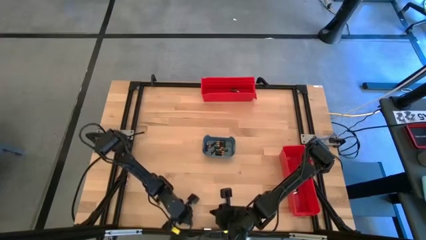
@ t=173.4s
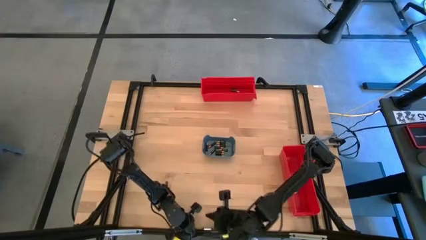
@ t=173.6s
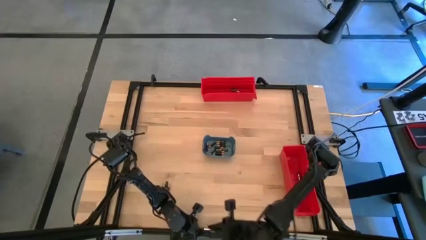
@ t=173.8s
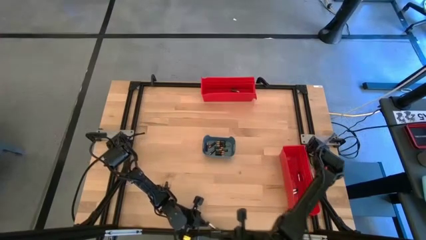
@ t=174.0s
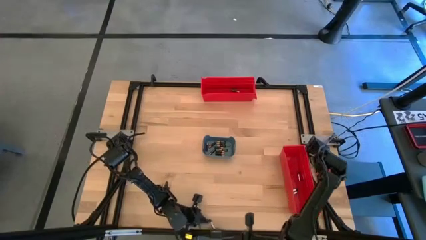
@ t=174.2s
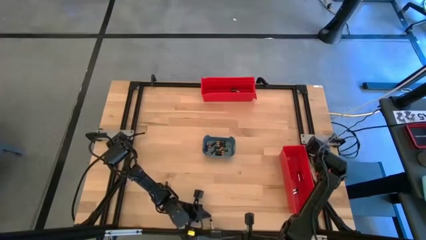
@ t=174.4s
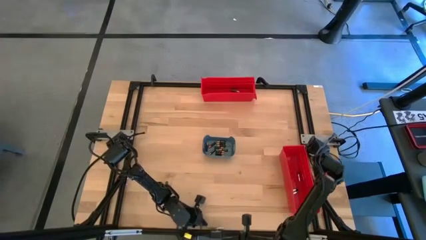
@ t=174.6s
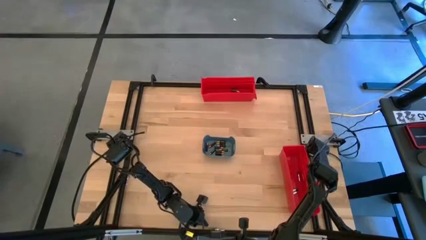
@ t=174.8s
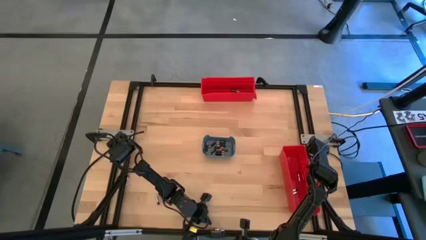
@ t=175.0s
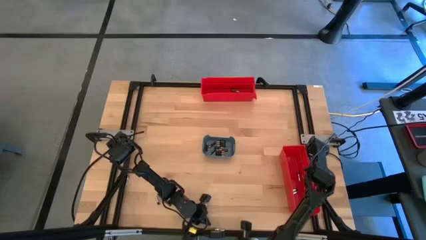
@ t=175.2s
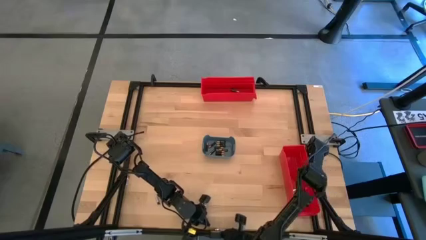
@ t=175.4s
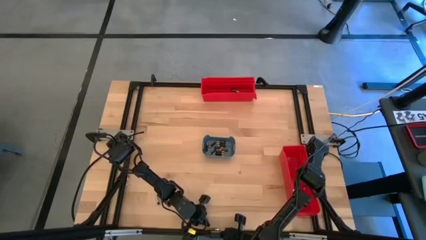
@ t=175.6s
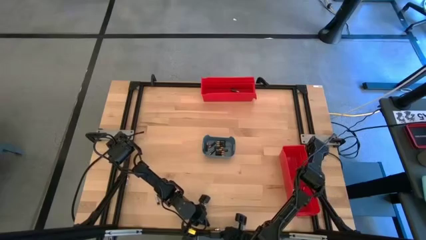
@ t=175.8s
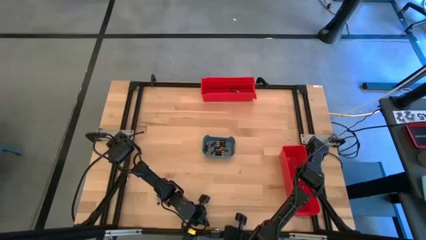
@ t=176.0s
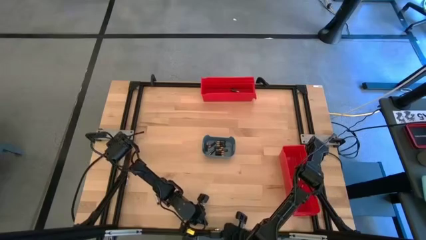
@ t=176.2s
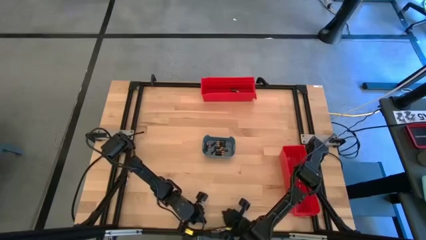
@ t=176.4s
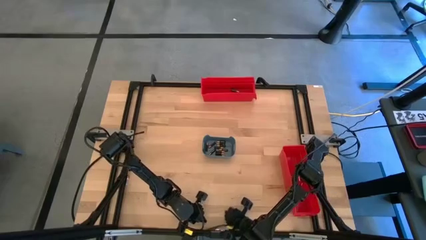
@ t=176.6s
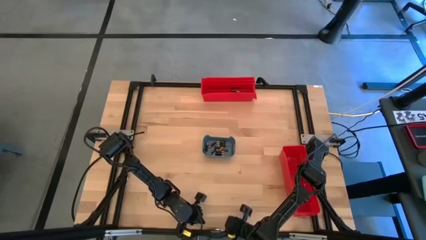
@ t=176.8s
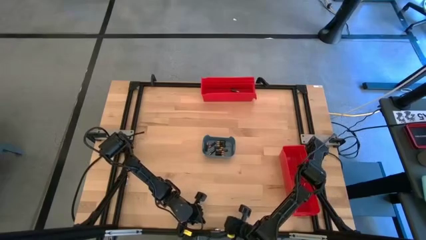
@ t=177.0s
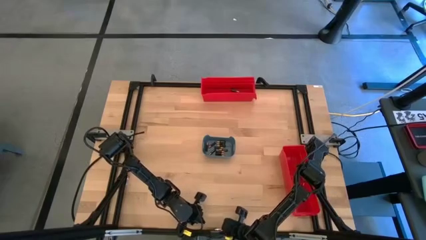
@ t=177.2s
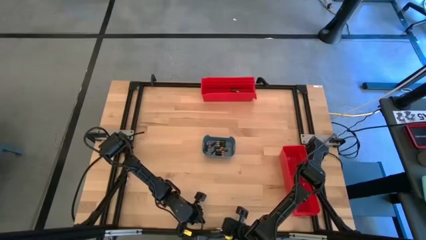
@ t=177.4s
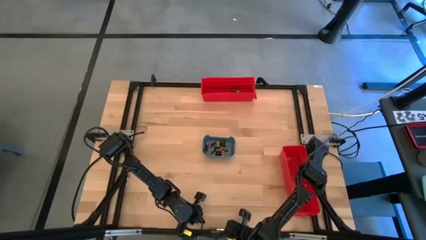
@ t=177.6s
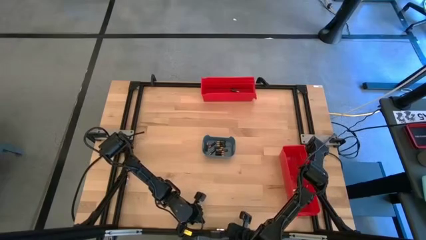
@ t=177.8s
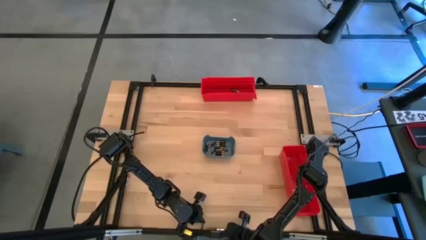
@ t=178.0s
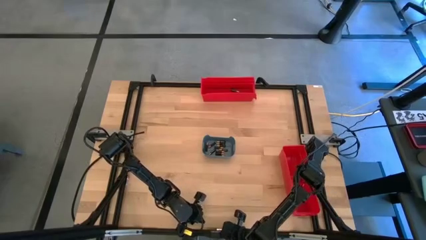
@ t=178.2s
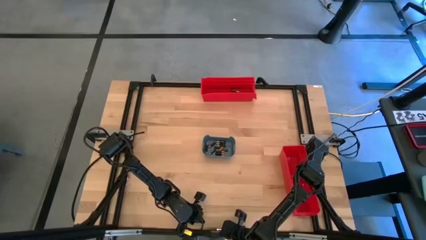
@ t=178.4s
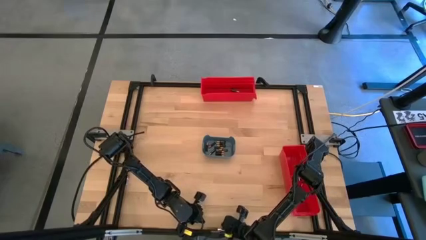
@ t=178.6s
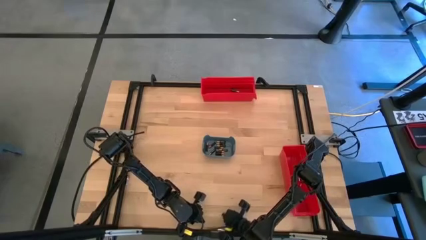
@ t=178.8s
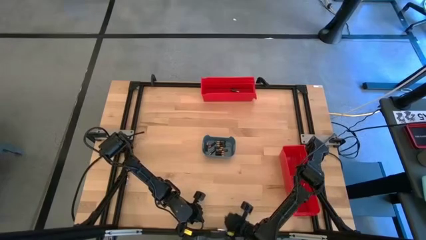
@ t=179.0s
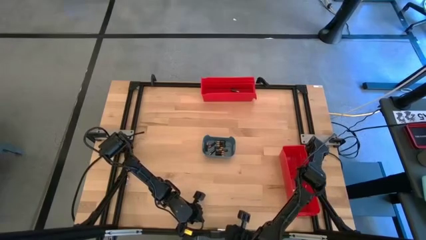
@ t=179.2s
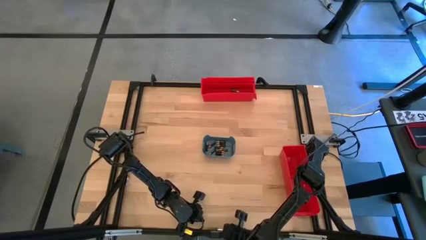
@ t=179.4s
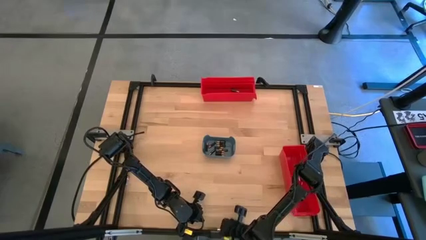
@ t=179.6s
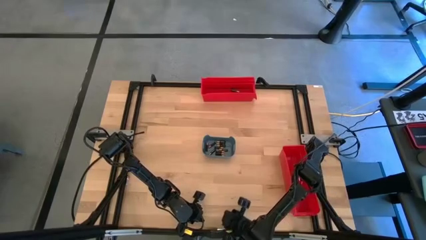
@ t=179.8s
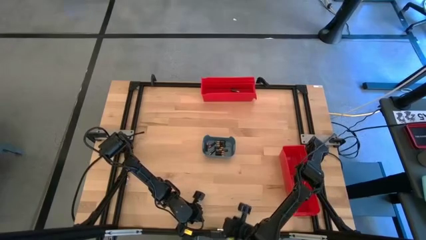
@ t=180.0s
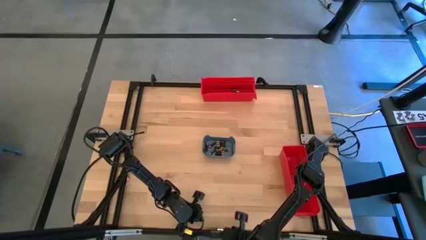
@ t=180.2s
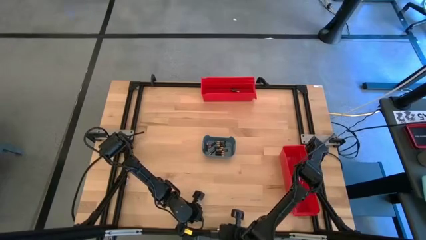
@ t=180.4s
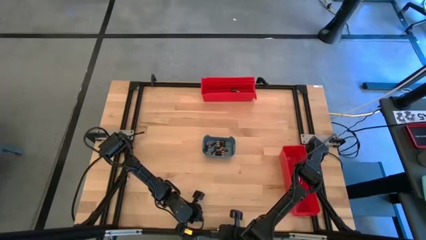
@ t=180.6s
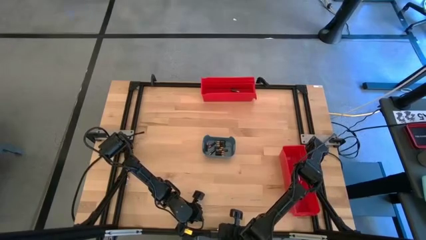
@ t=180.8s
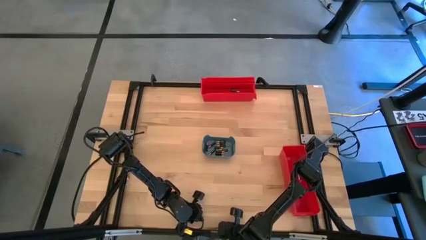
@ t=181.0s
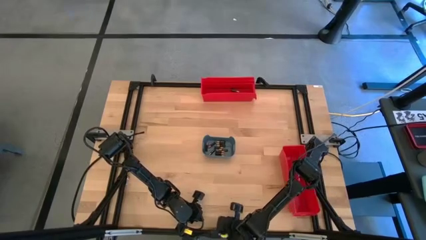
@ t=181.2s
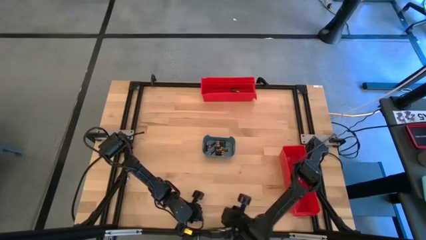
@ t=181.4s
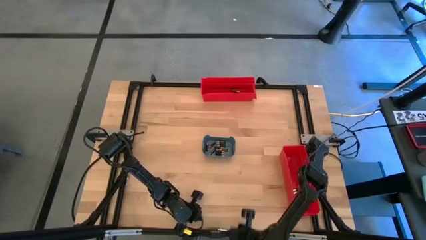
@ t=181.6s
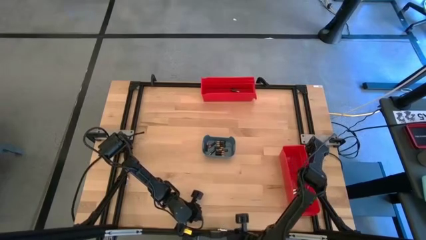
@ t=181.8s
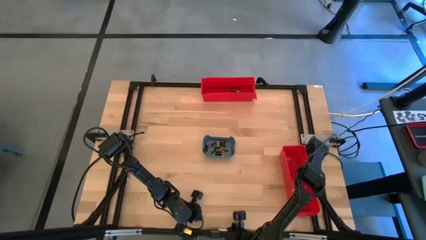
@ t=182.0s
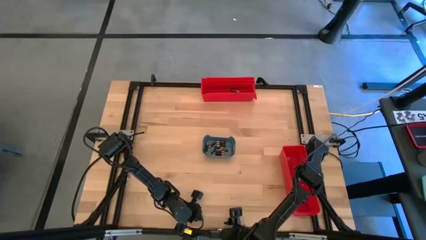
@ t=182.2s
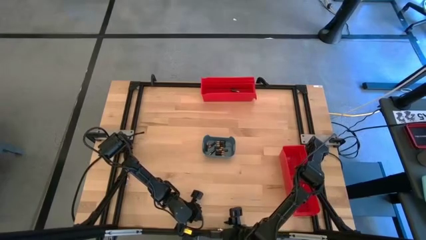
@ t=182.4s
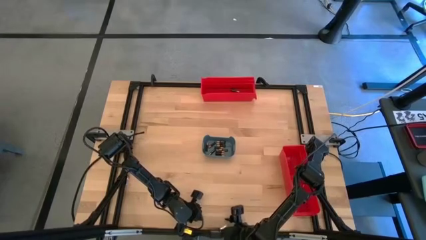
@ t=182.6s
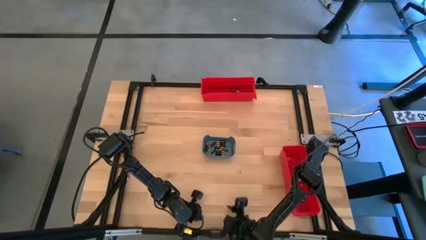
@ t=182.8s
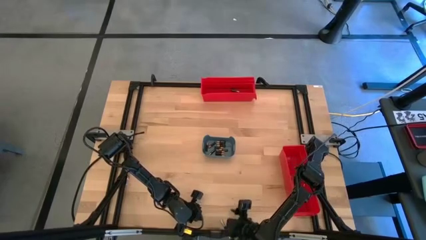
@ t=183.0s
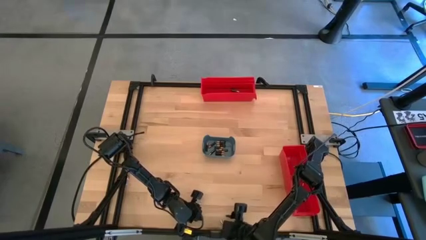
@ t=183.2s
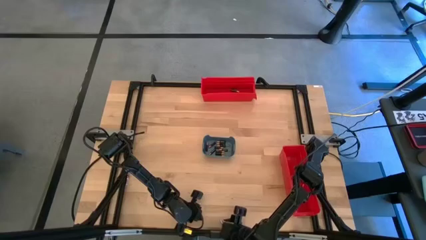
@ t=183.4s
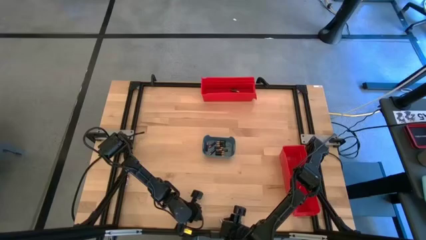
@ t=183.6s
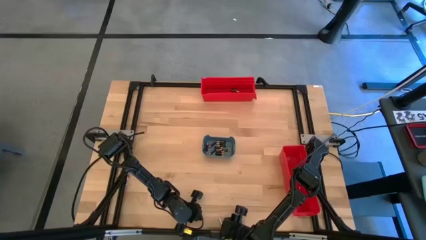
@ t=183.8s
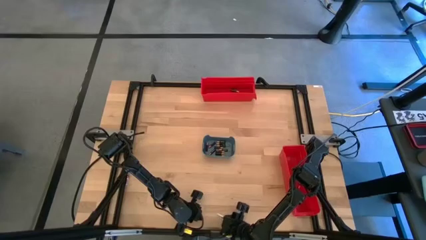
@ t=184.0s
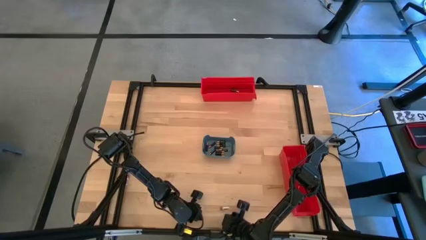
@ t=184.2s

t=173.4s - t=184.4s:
Task: Sort batteries
Put the silver battery into the bottom red bin

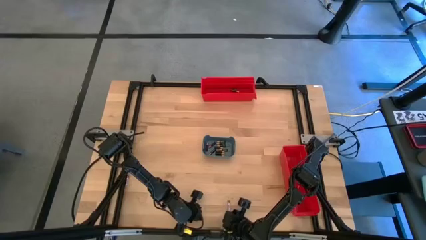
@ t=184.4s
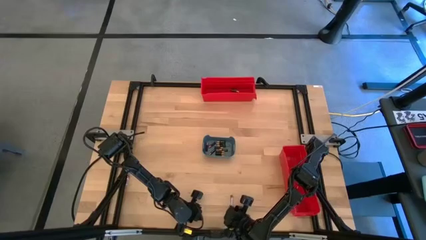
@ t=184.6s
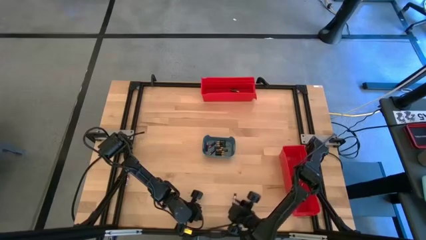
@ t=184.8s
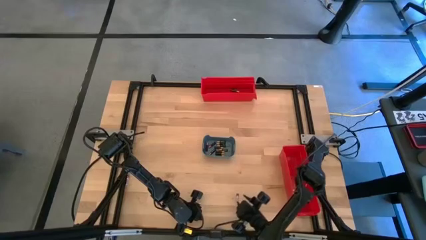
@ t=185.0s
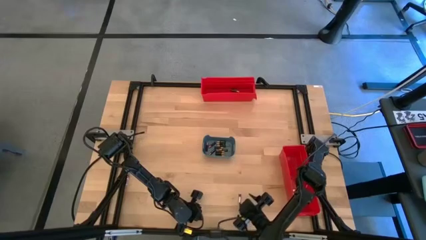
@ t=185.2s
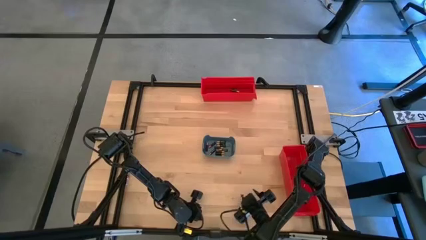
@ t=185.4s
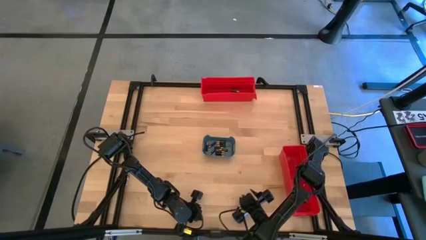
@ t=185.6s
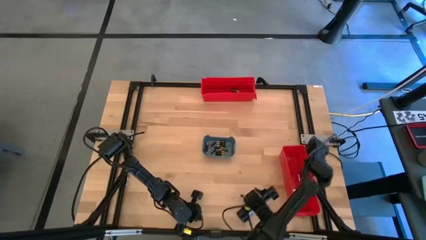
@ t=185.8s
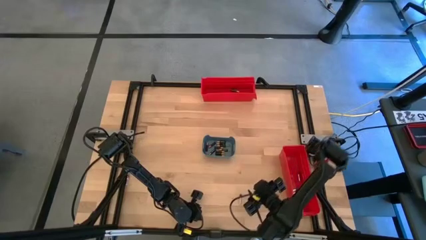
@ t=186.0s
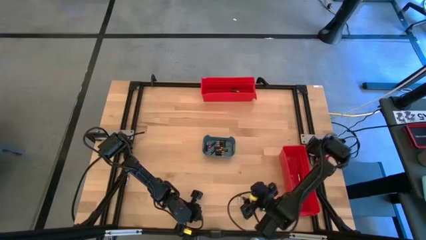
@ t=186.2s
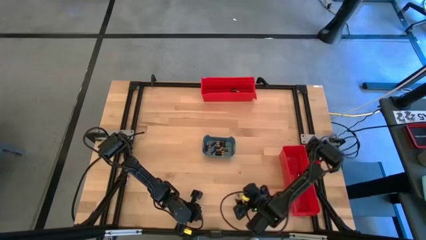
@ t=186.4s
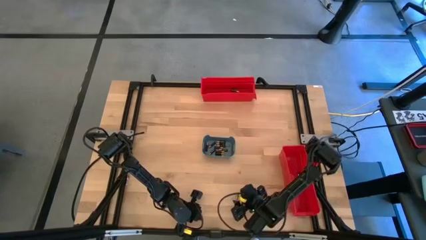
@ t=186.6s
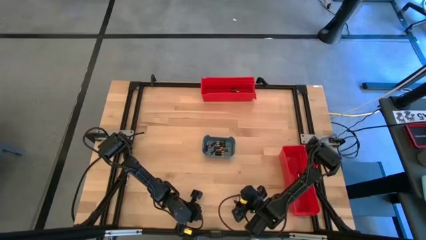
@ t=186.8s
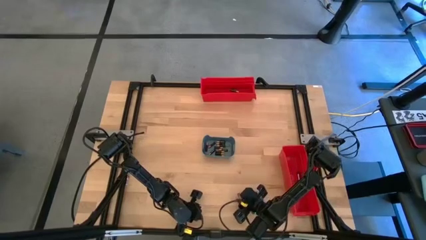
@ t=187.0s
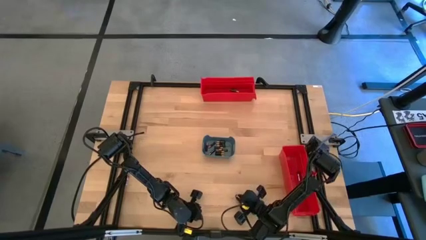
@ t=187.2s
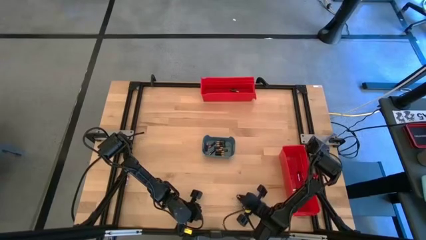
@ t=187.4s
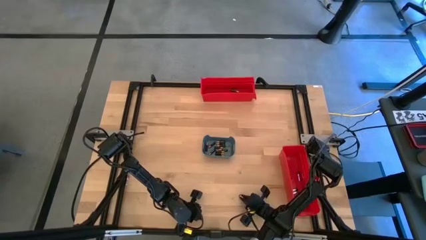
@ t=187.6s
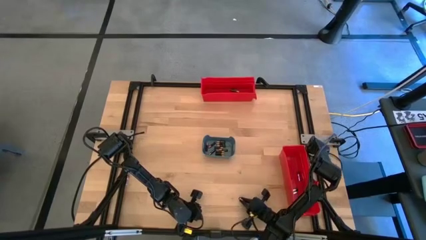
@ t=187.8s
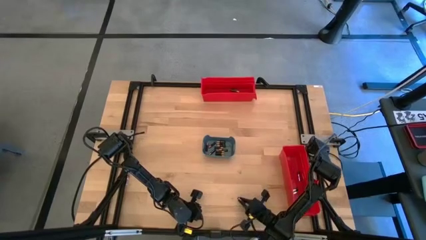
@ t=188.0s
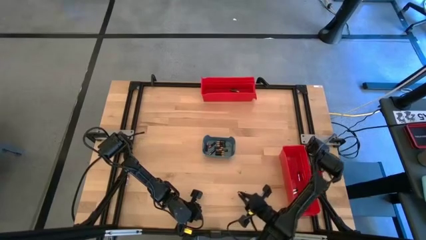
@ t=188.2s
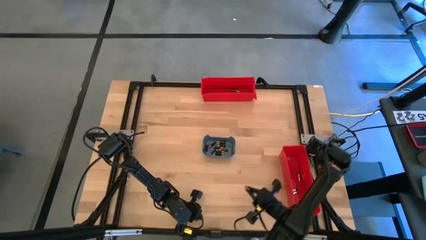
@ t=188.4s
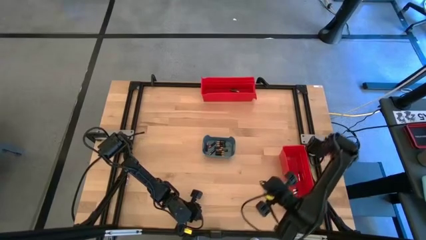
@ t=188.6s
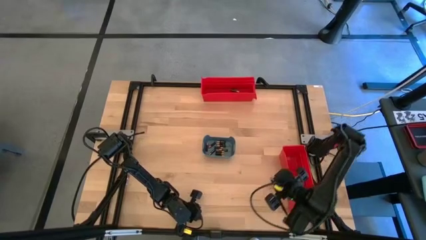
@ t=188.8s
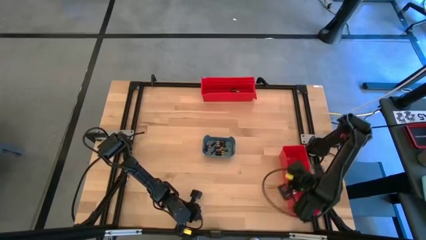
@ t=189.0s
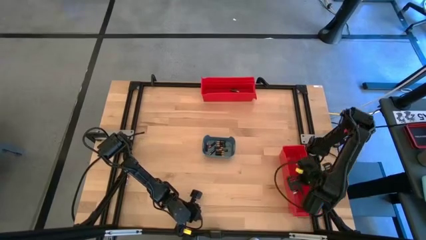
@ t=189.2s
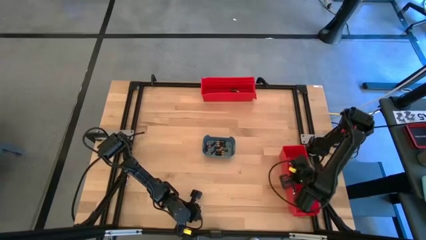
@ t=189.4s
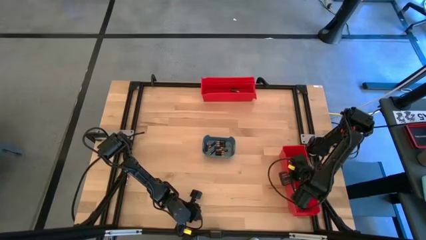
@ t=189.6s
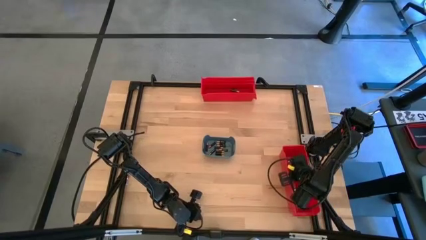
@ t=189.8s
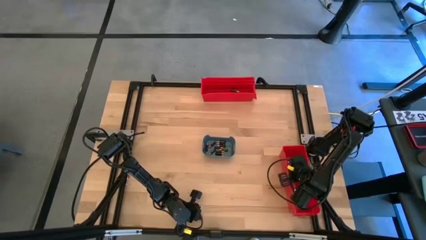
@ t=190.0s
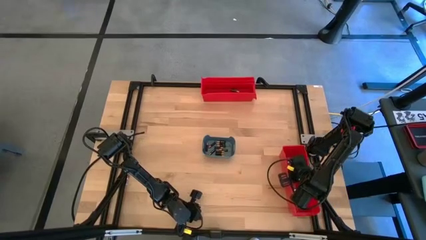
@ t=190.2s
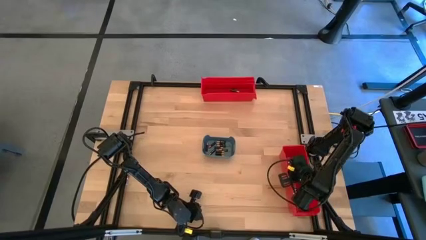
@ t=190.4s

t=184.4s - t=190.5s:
Put the silver battery into the bottom red bin
